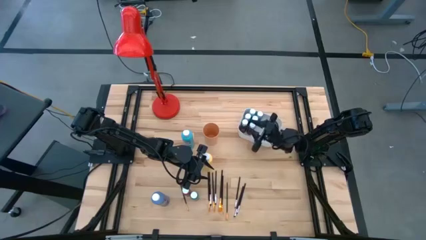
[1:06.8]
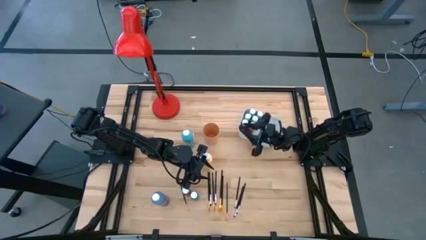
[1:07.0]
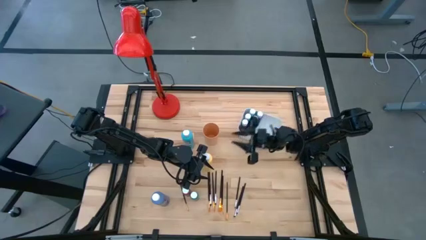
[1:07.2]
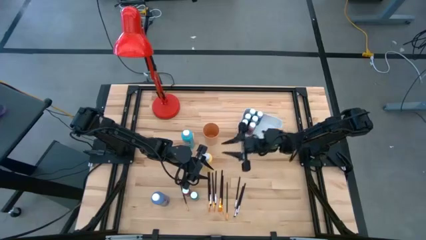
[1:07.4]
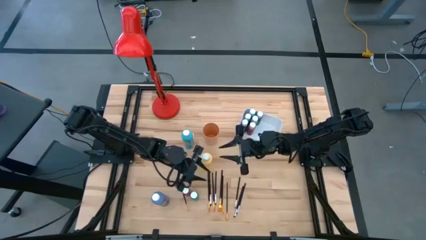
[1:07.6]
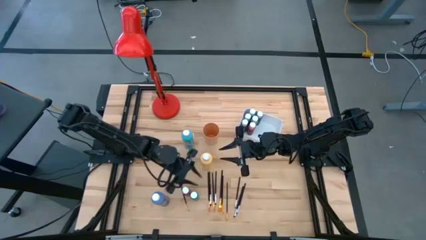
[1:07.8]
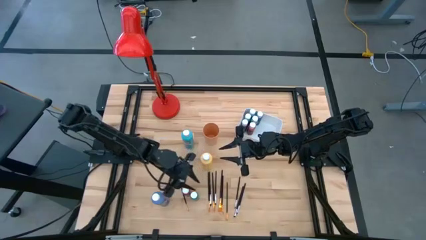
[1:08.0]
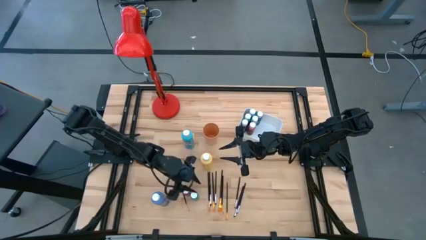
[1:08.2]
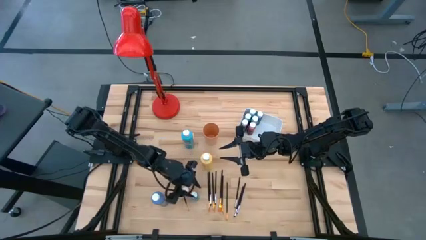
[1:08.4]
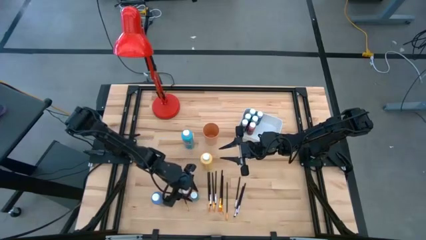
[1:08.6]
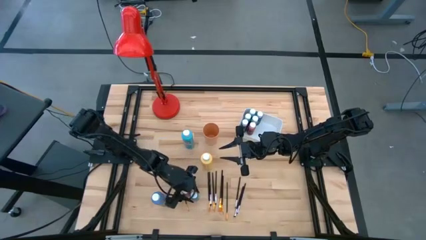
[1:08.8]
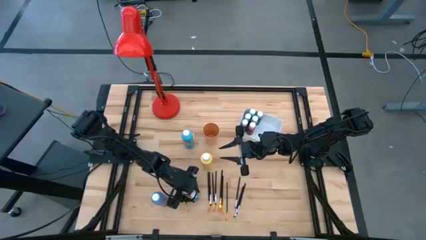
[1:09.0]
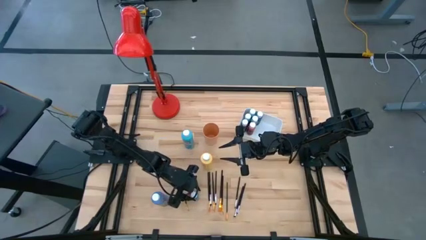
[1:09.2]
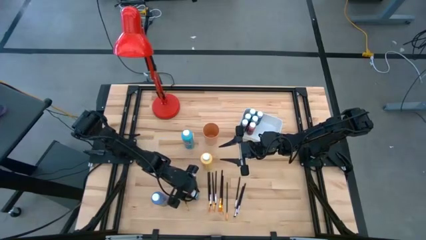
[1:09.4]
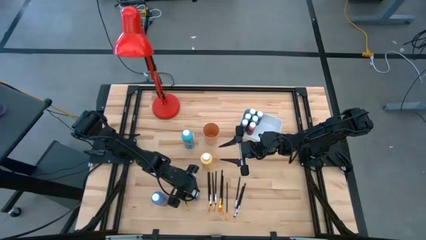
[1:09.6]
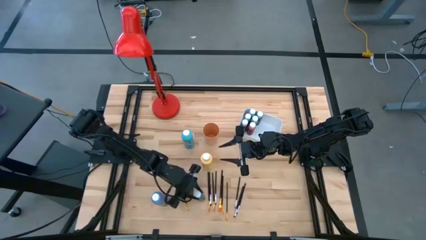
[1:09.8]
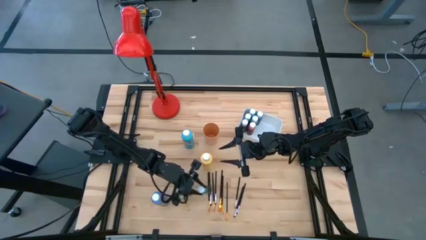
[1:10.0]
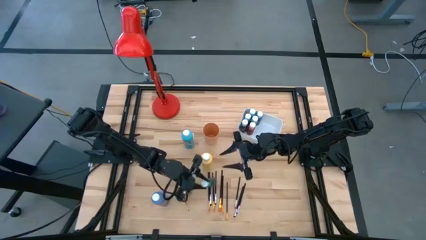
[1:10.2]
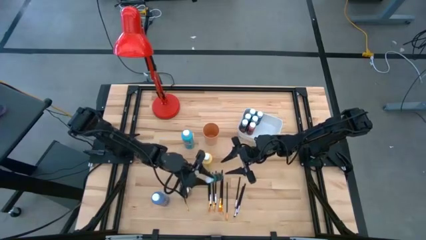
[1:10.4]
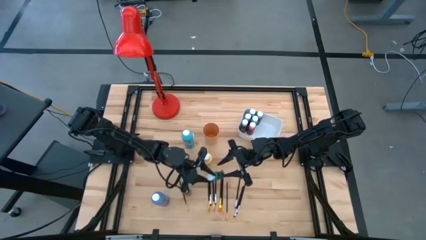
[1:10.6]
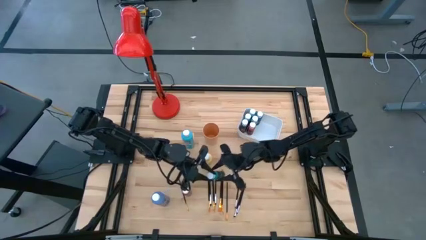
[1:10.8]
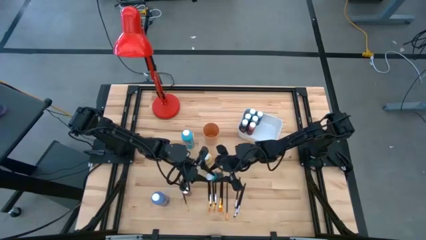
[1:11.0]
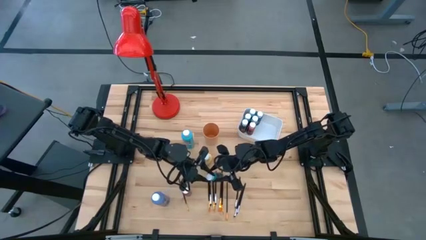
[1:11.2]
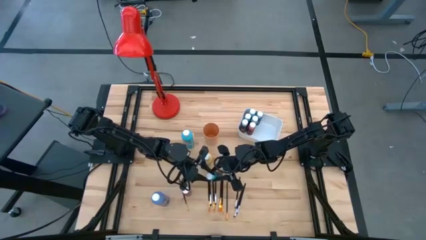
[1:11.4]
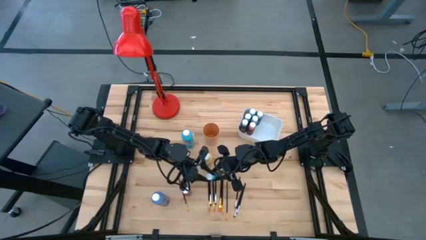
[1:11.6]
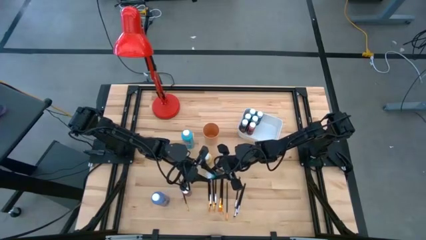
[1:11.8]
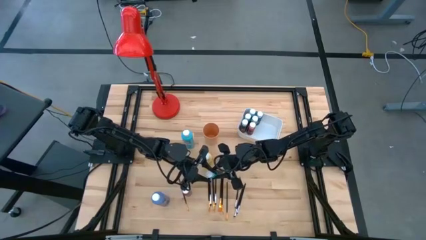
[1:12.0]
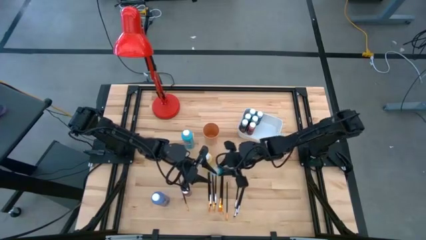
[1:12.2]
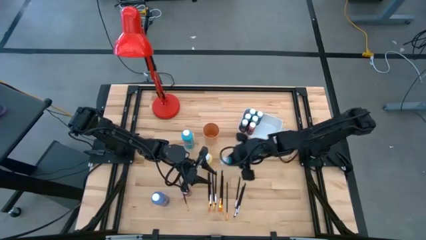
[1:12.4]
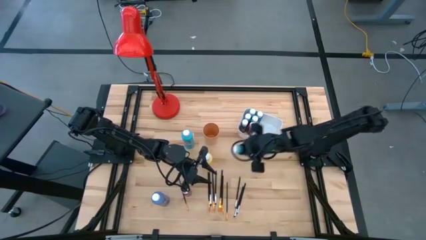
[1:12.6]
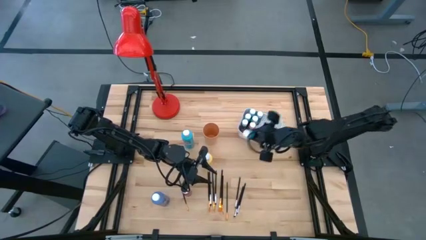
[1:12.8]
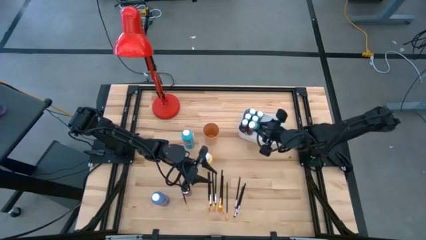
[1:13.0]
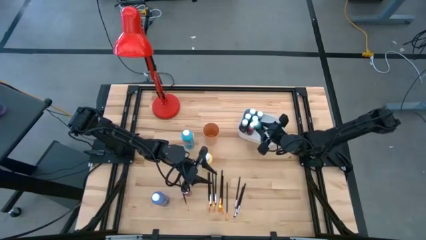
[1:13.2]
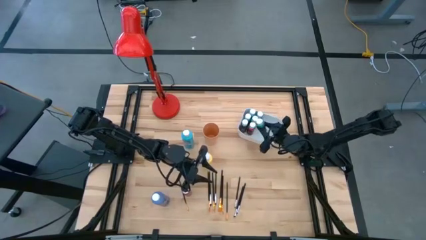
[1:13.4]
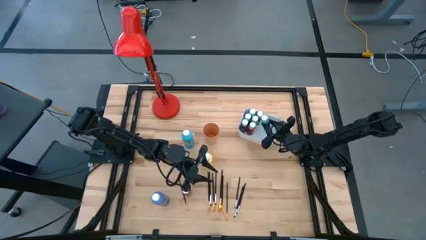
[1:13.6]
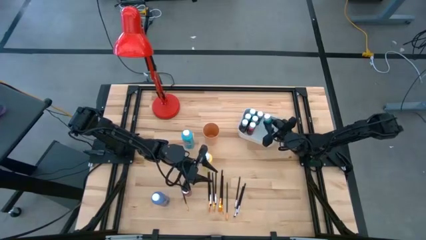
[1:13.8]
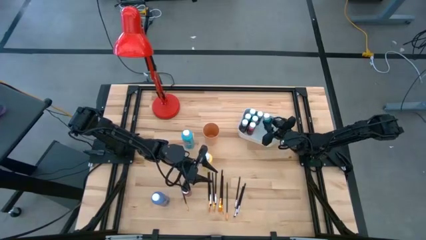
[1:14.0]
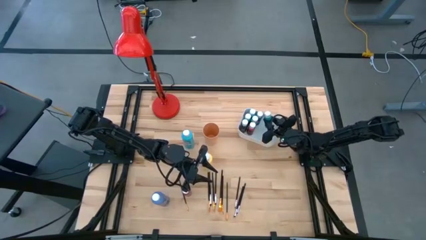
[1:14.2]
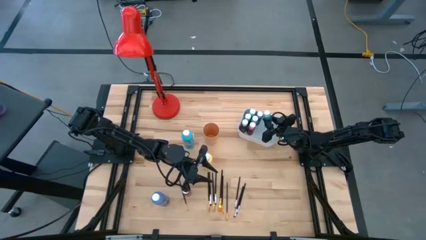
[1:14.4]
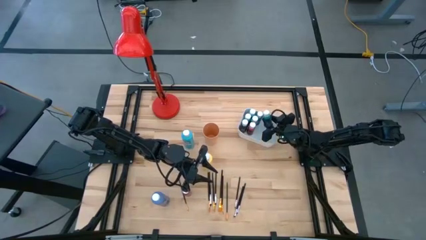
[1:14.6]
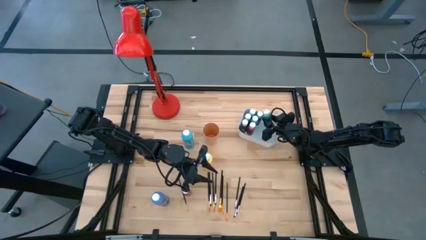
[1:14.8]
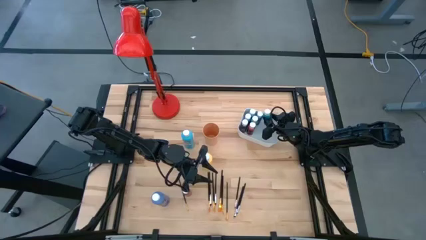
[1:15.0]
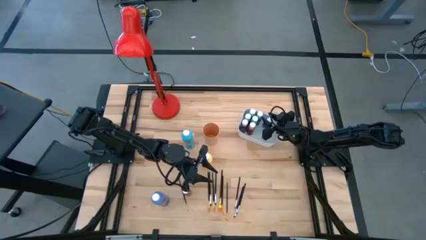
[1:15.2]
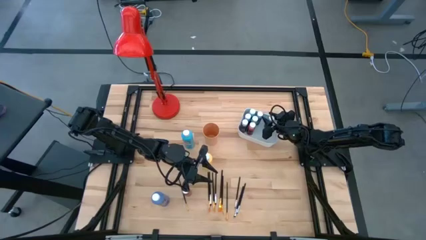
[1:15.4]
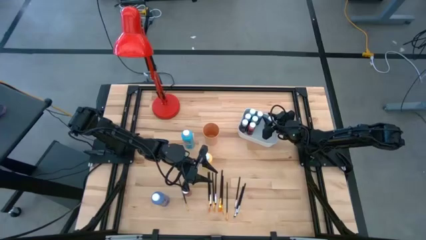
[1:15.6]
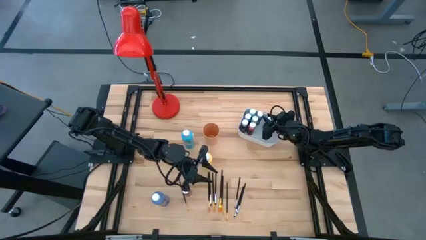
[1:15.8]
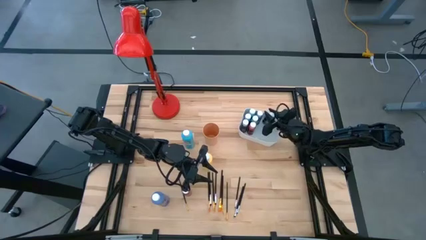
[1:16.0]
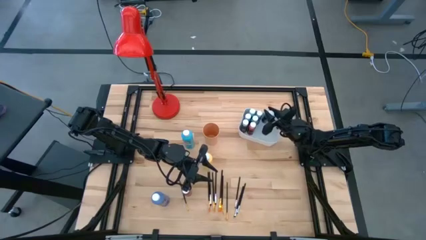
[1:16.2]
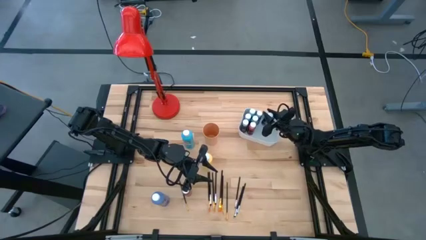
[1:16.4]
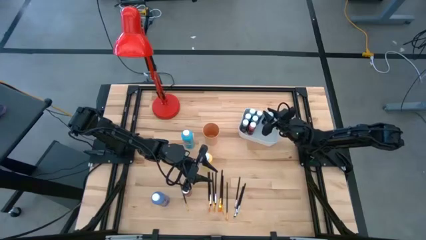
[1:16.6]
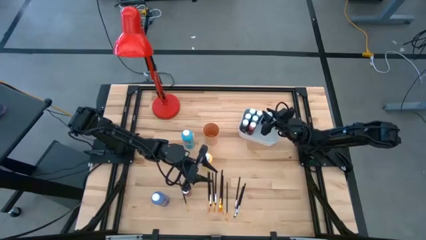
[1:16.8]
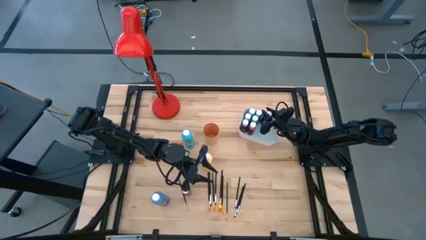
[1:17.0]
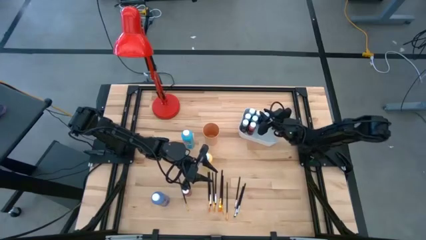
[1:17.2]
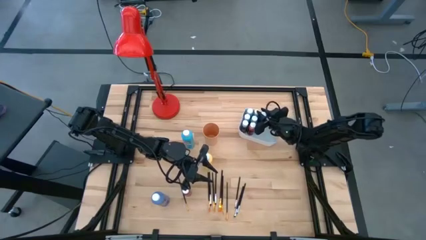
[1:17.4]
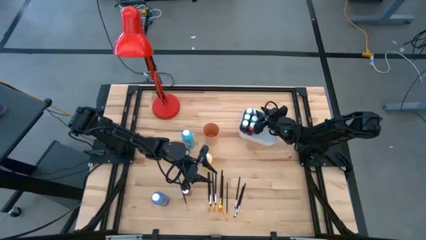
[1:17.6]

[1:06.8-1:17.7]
Task: Pick & Place Paint Supplies
Put the dark green paint bottle into the white bin
